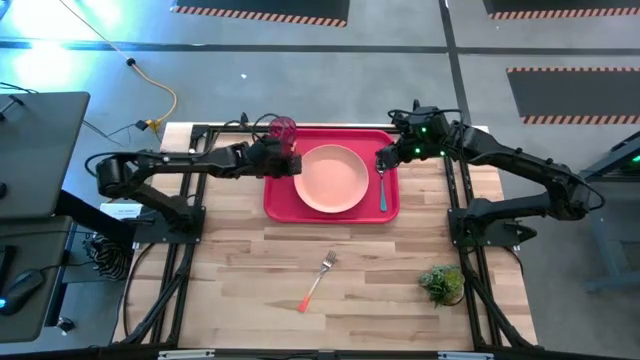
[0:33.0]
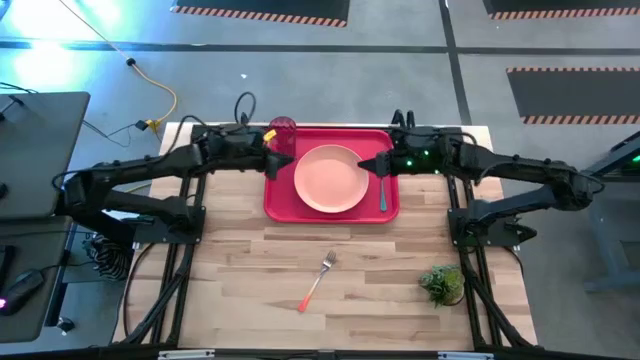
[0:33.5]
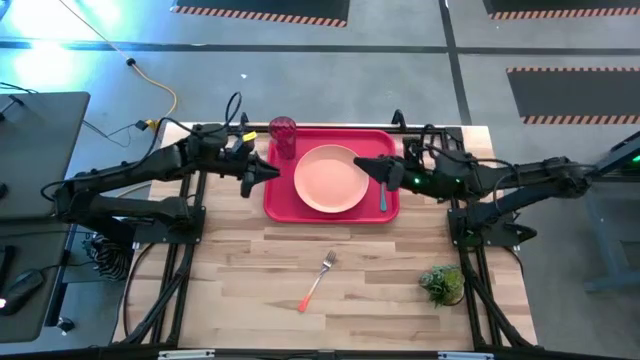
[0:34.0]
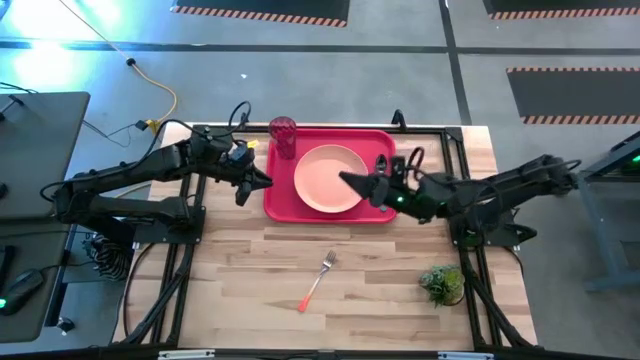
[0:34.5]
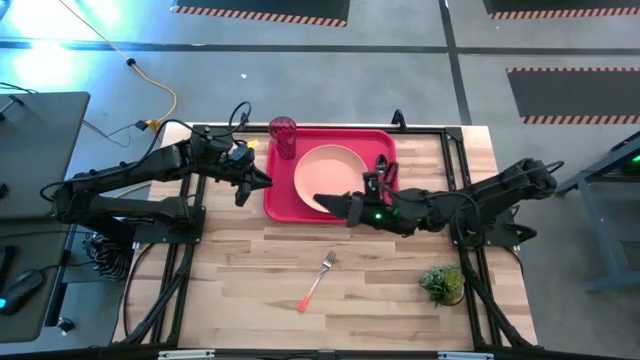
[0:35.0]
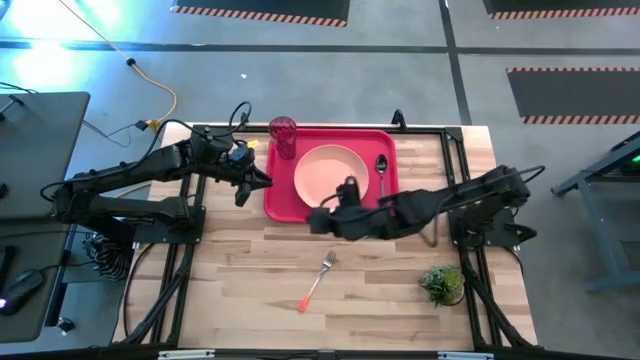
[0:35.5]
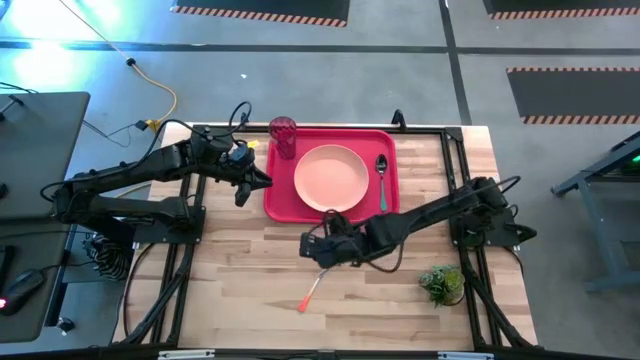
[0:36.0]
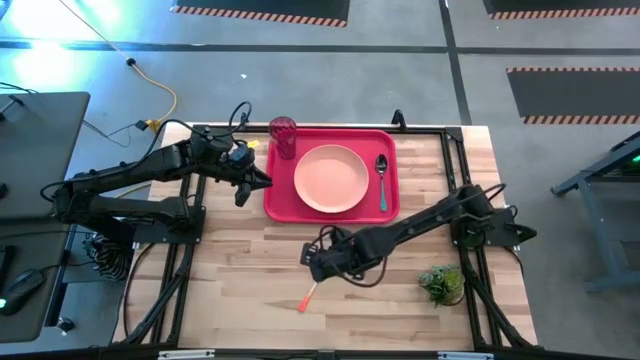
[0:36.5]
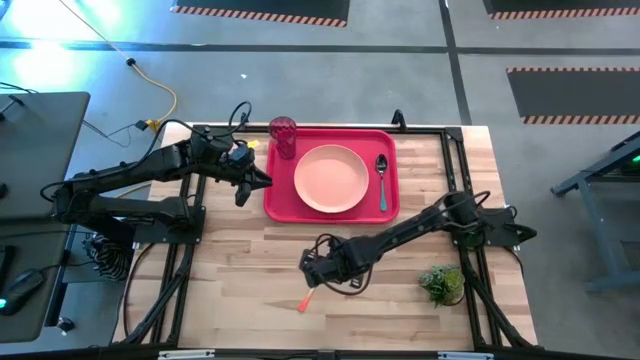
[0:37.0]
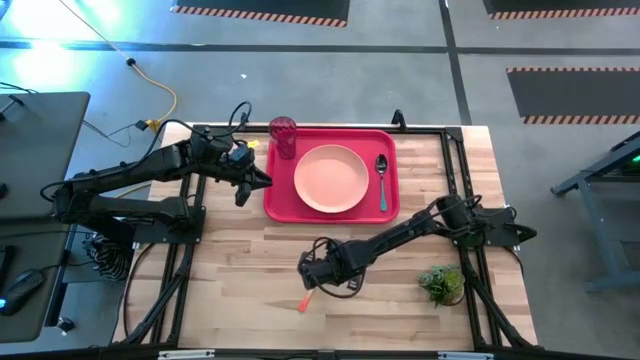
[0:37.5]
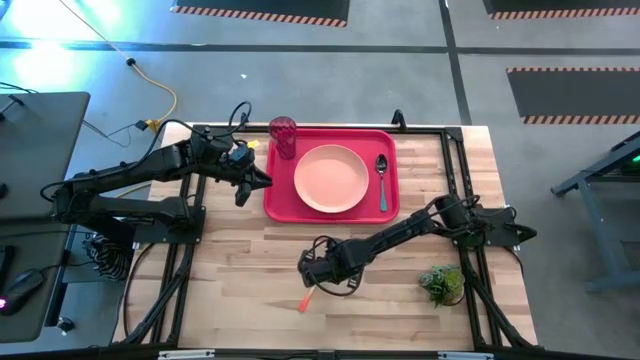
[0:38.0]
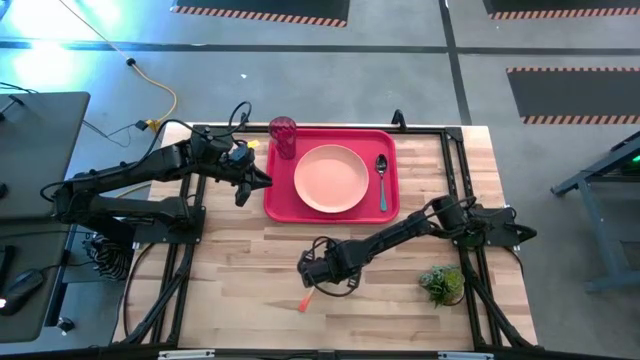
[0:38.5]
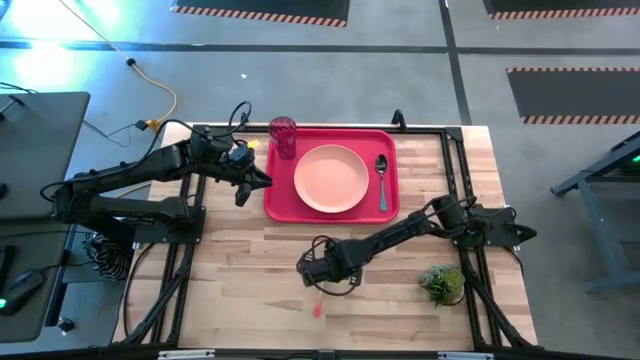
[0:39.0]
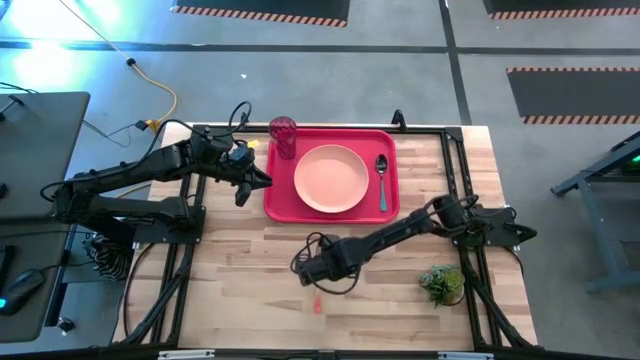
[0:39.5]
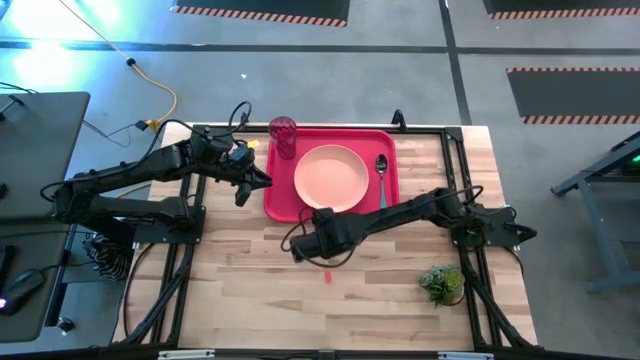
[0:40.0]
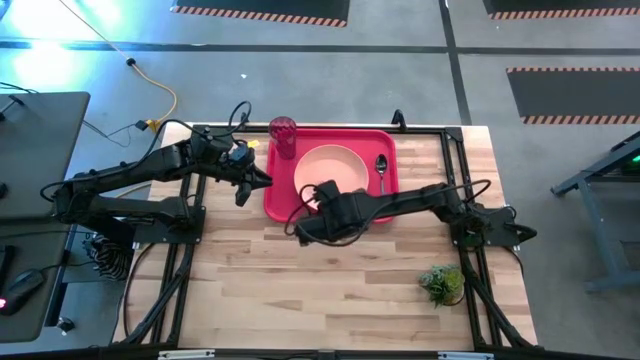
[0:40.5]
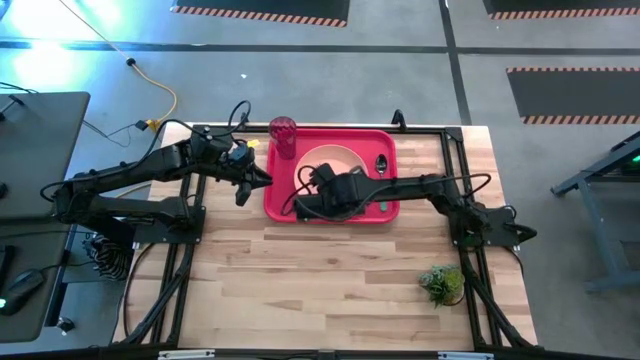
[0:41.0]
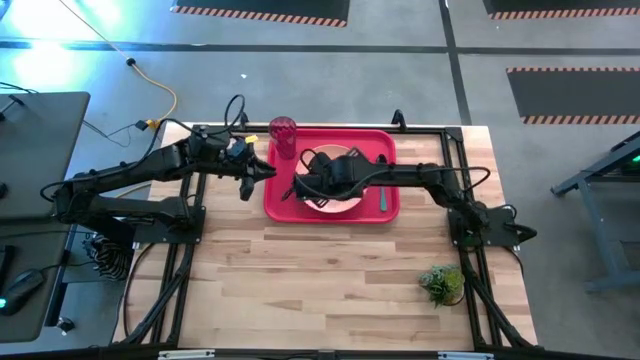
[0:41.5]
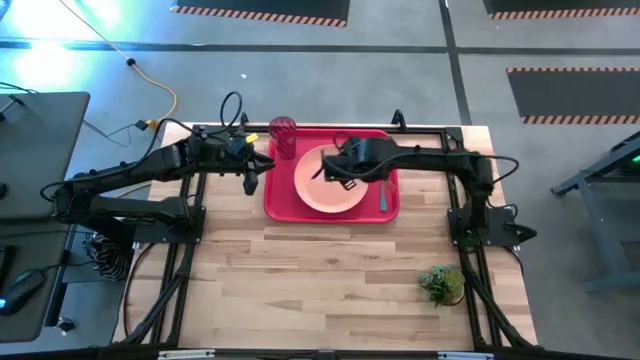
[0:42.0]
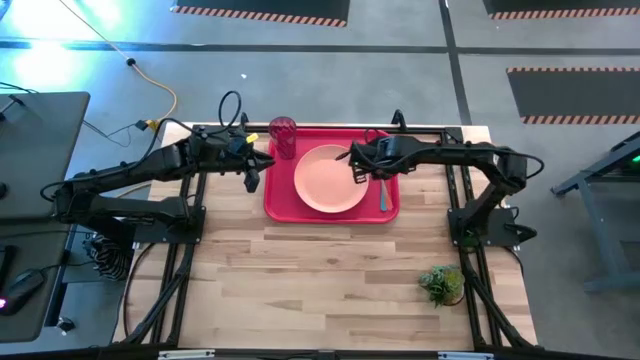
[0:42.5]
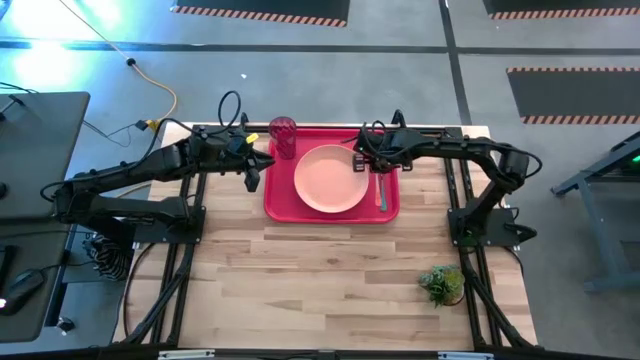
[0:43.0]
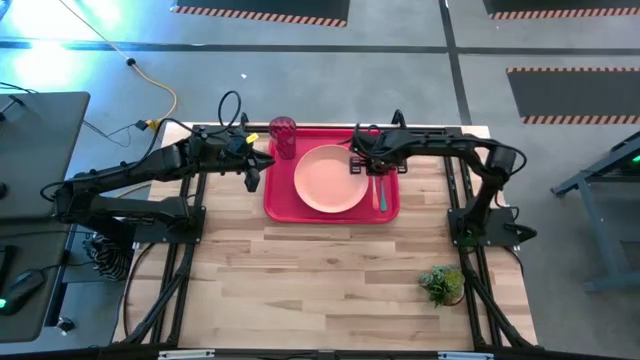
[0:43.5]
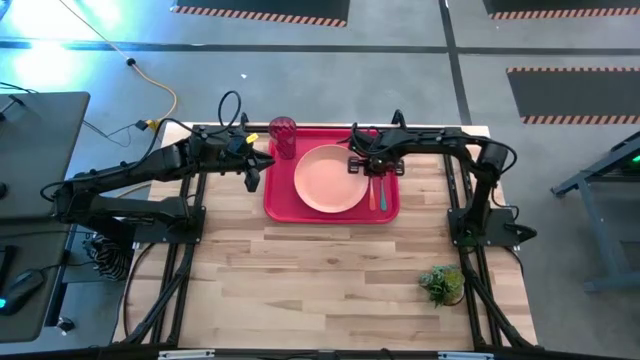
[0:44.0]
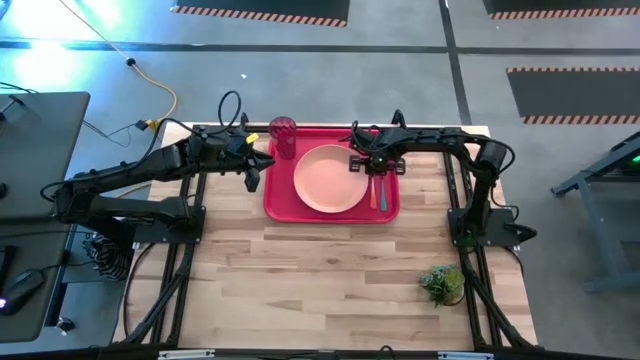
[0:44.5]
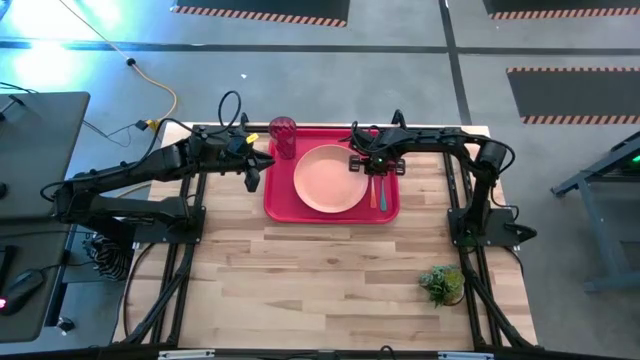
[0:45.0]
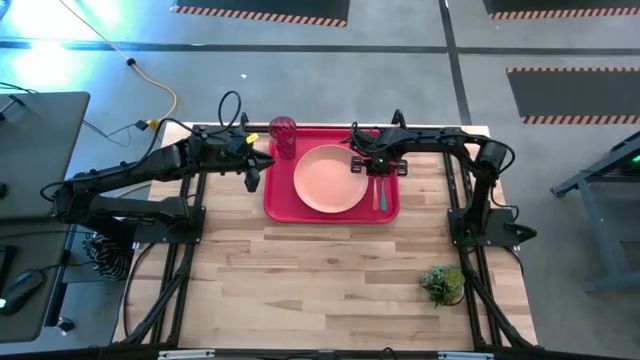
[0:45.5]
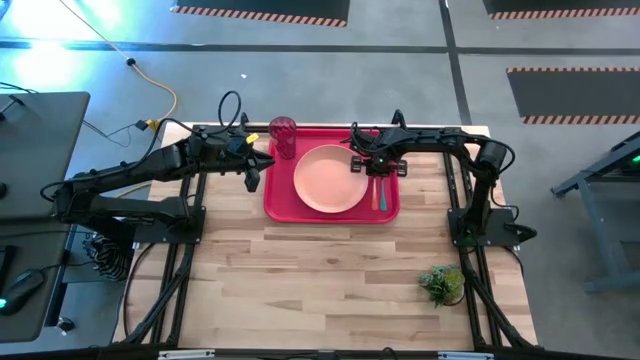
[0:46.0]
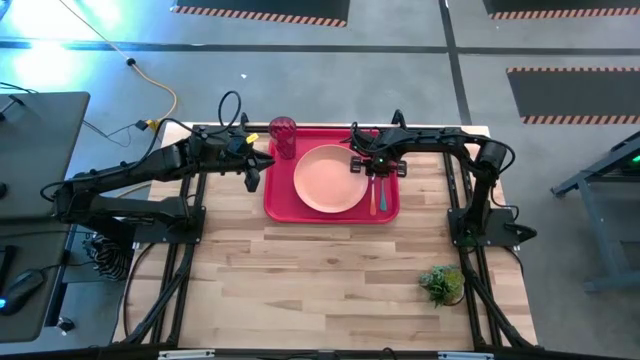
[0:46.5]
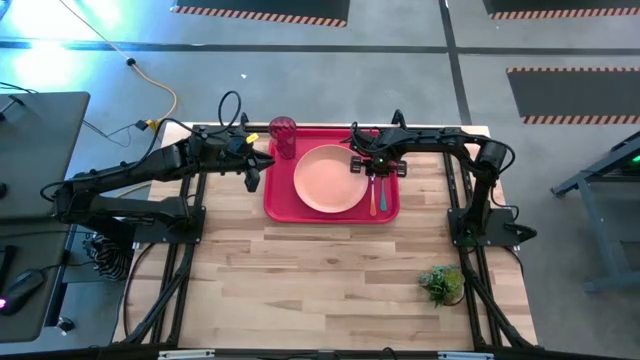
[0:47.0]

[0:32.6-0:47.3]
Task: Pick and place plate/cup/fork/spoon on tray
Put the orange fork to the left side of the blue spoon on the red serving tray

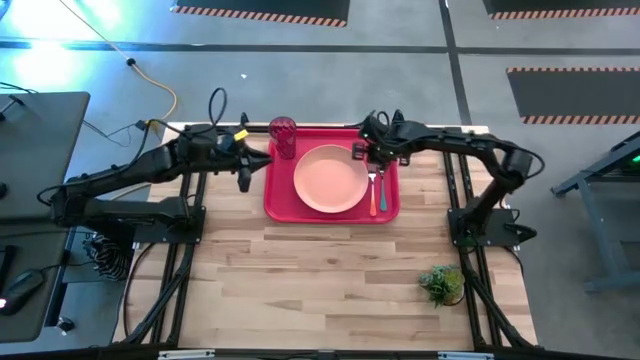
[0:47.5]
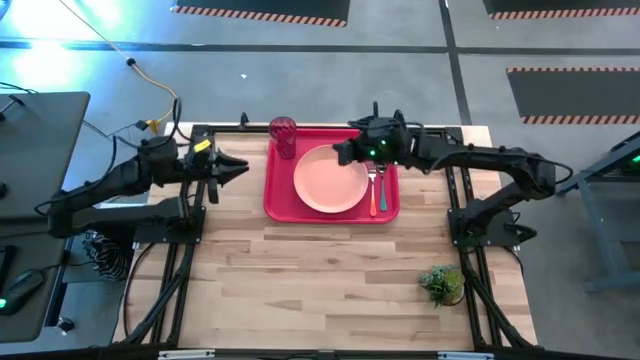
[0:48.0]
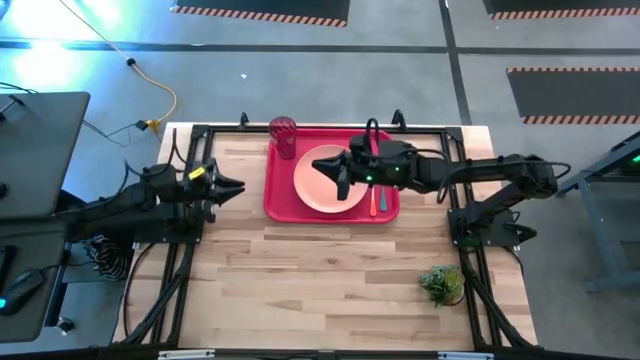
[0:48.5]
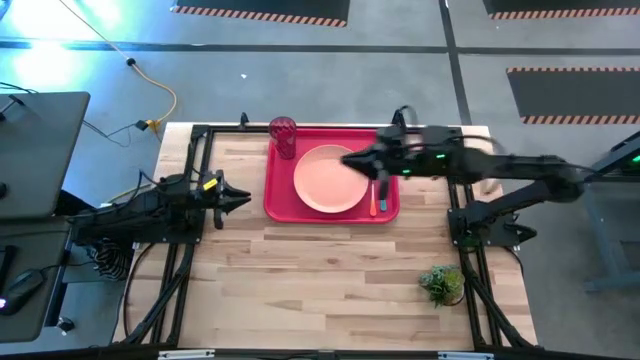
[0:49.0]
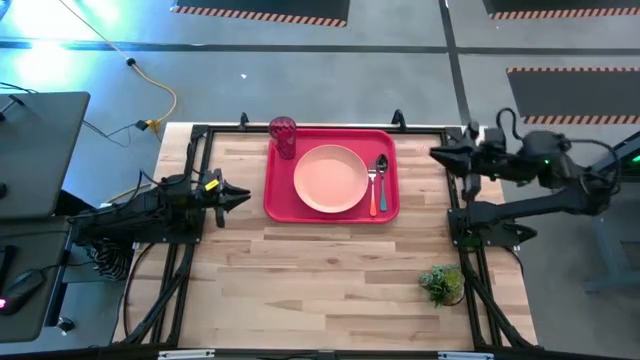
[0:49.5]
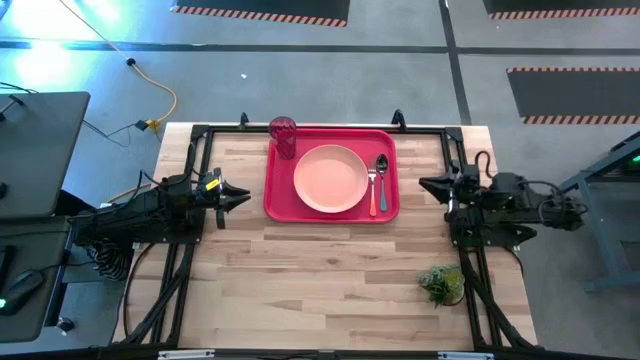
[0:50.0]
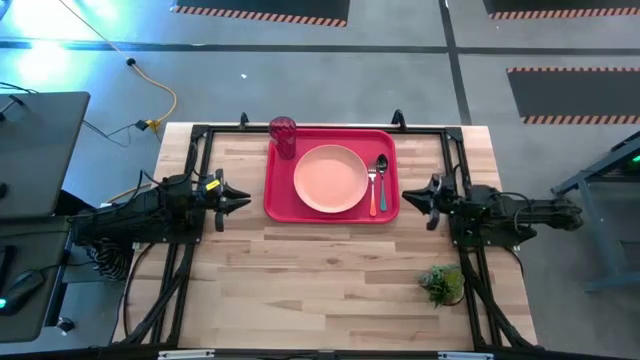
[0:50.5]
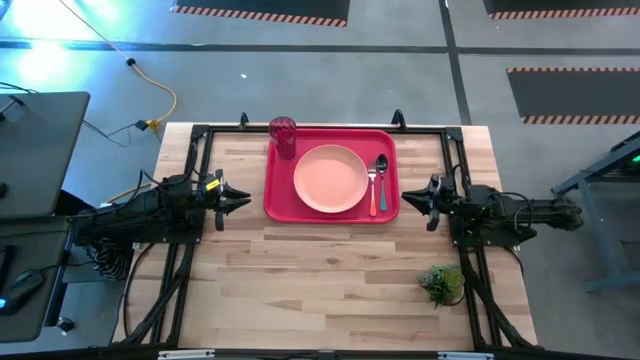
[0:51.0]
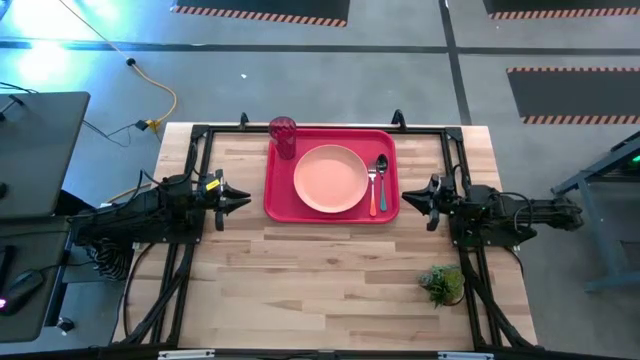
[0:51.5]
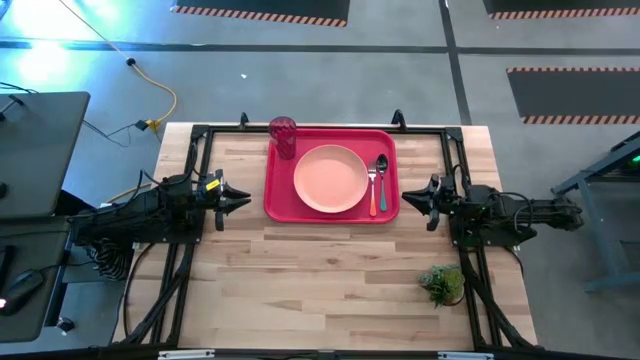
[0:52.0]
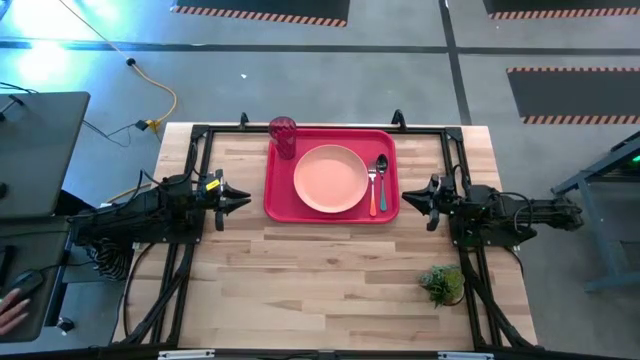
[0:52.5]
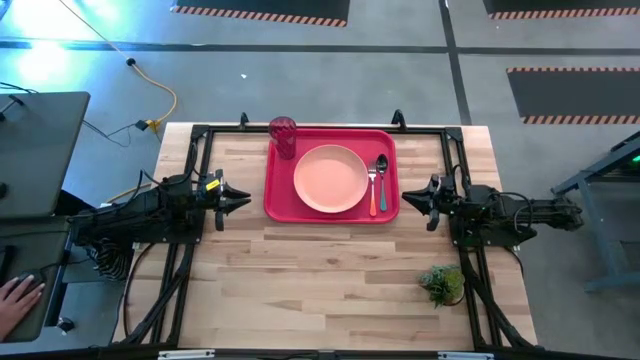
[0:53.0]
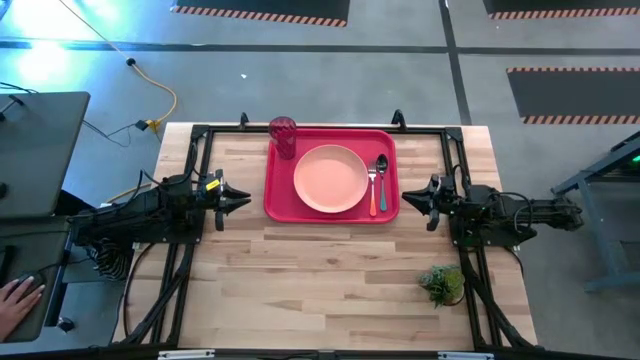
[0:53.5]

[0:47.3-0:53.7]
Return to Home Position

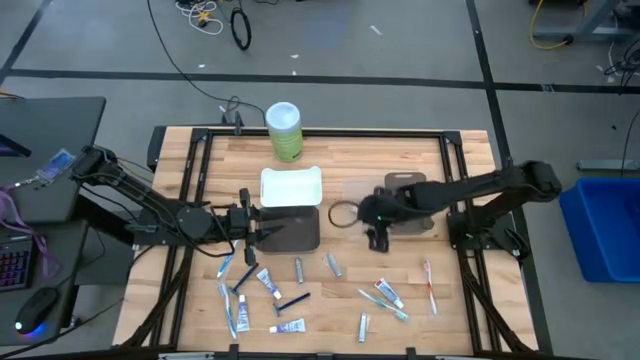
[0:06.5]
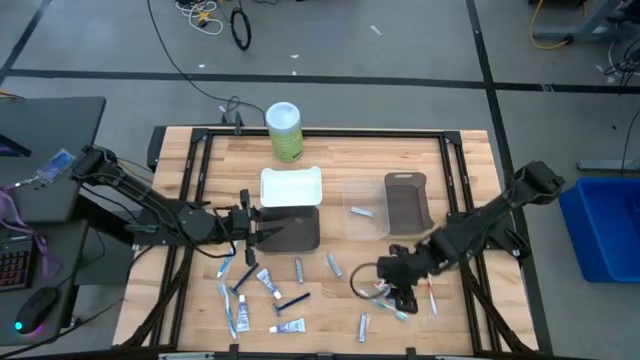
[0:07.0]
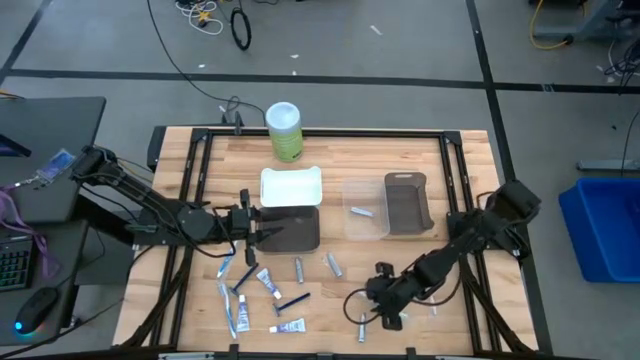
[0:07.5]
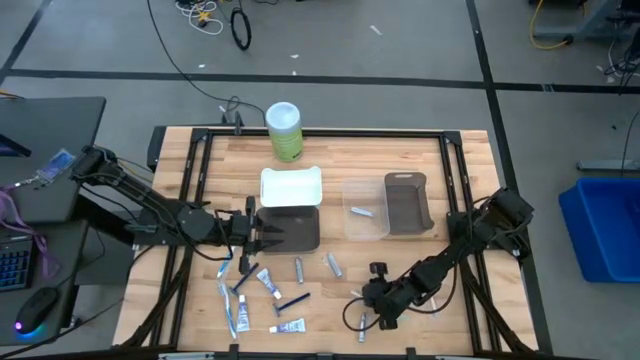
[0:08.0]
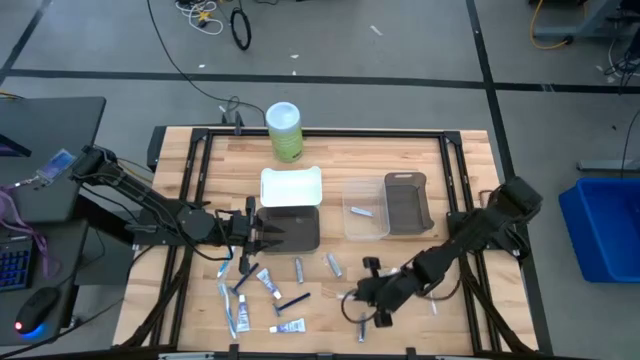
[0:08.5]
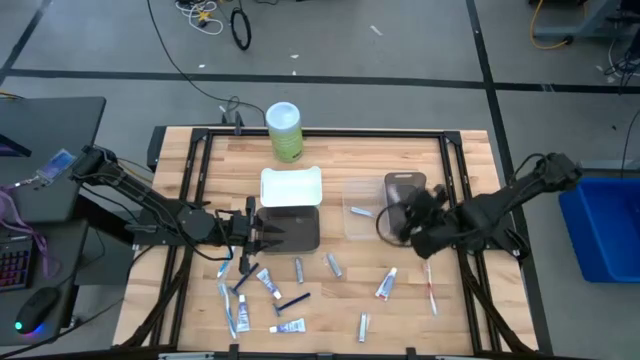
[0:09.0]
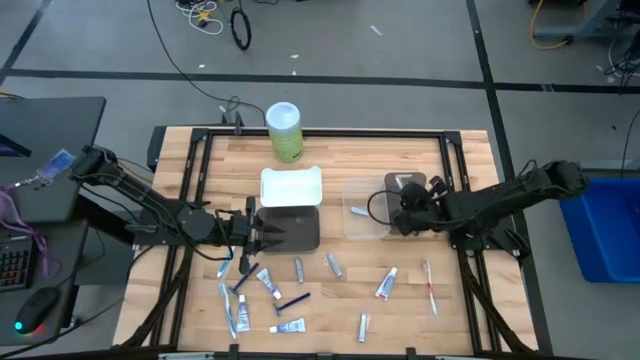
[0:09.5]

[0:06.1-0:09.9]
Task: Pick & Place Travel size toiletries
Put the green toothbrush into the right black bin
